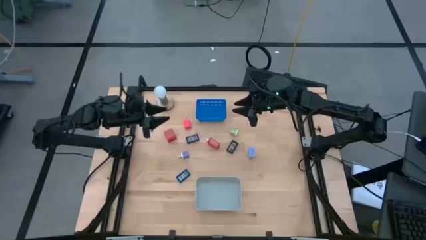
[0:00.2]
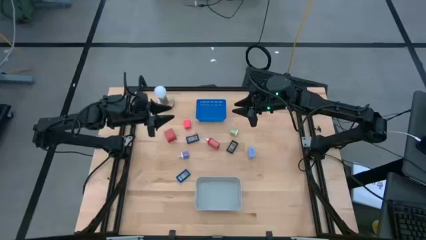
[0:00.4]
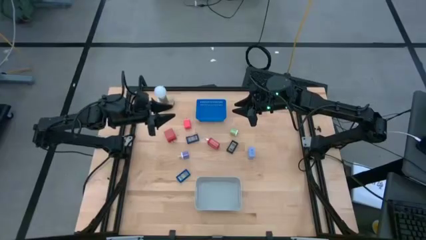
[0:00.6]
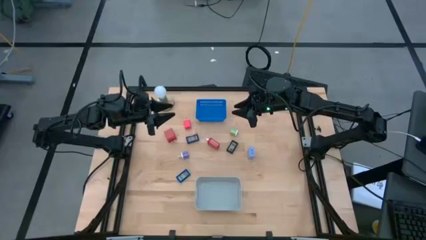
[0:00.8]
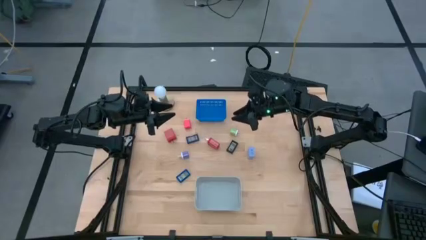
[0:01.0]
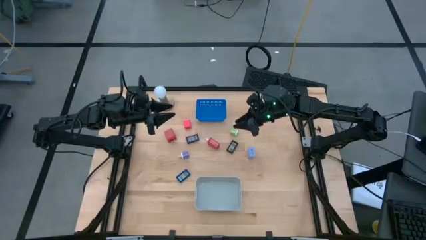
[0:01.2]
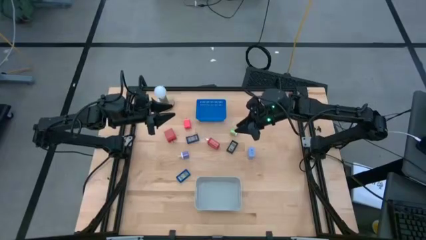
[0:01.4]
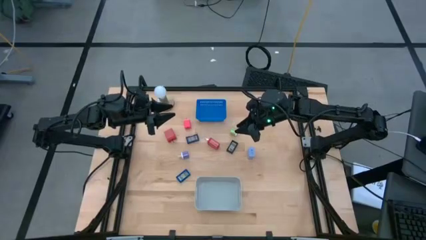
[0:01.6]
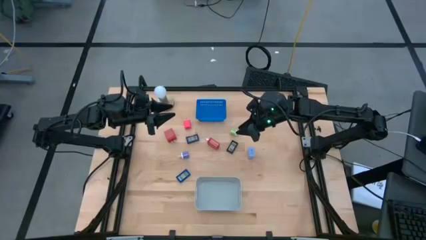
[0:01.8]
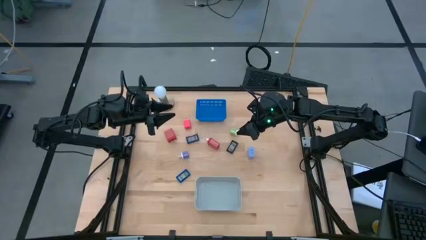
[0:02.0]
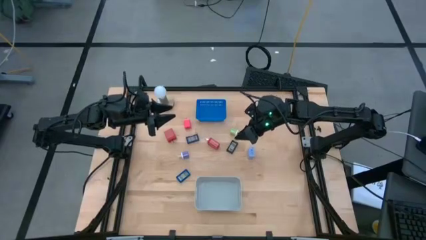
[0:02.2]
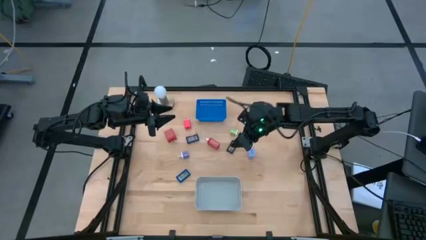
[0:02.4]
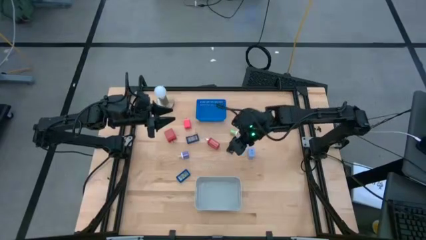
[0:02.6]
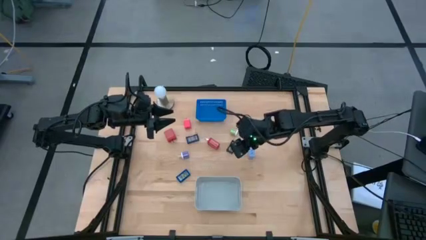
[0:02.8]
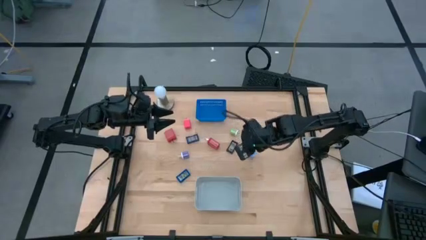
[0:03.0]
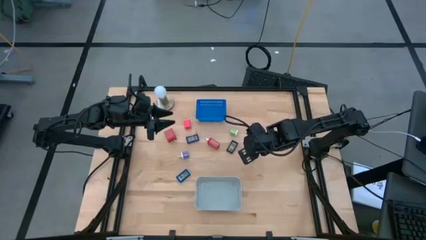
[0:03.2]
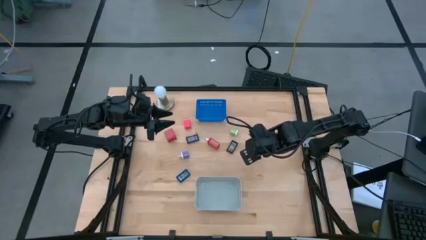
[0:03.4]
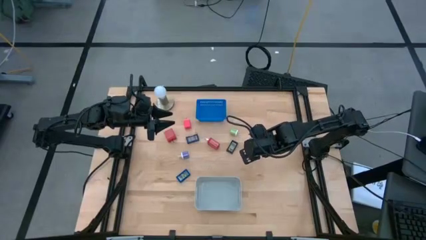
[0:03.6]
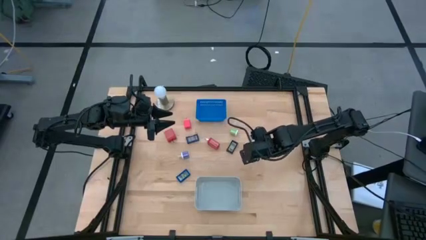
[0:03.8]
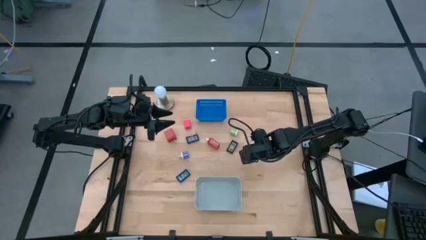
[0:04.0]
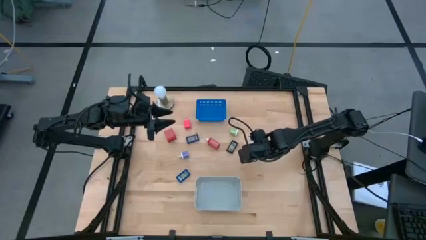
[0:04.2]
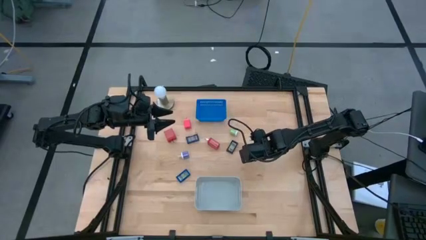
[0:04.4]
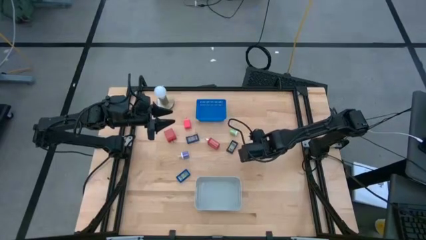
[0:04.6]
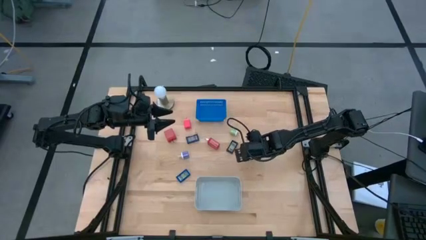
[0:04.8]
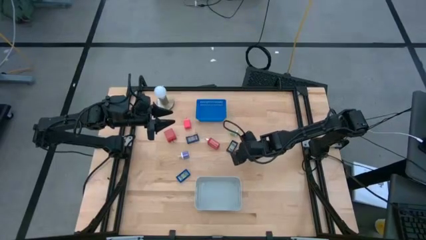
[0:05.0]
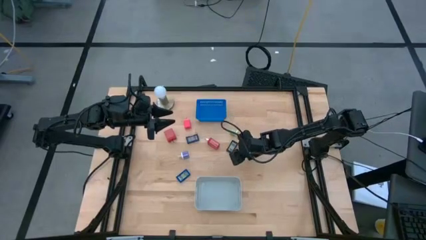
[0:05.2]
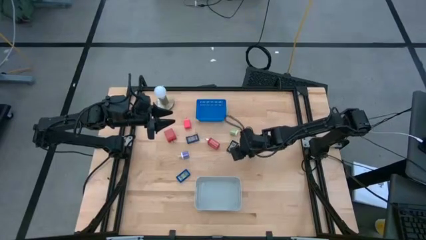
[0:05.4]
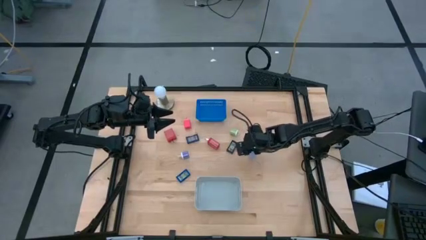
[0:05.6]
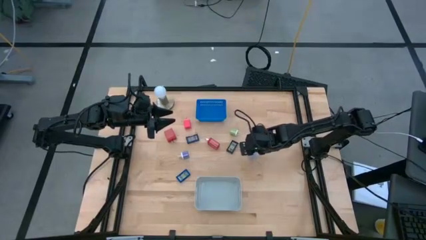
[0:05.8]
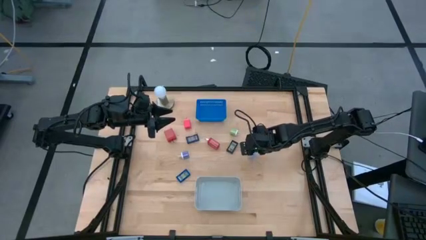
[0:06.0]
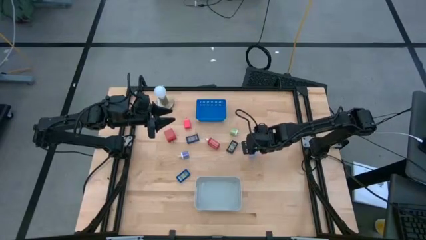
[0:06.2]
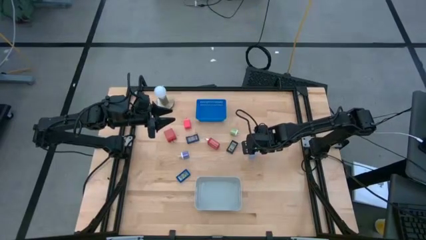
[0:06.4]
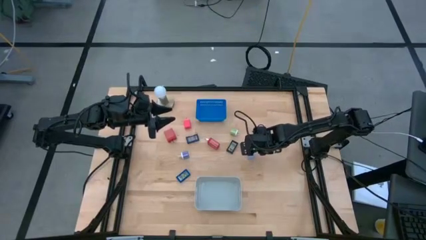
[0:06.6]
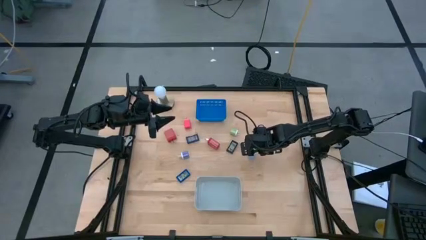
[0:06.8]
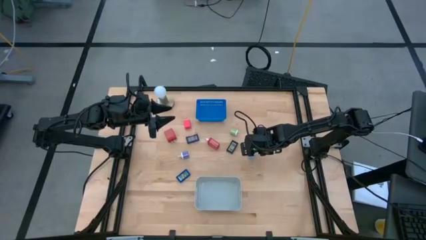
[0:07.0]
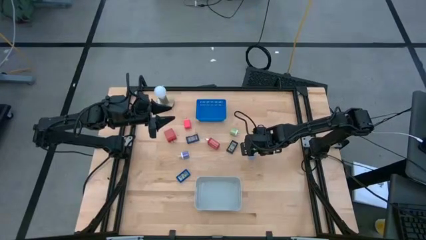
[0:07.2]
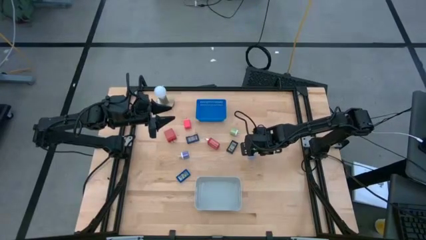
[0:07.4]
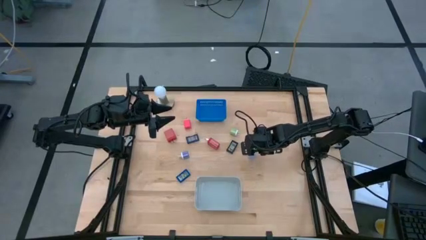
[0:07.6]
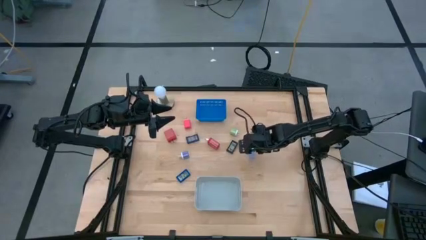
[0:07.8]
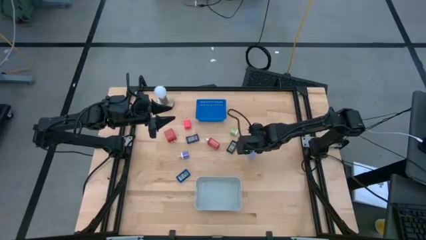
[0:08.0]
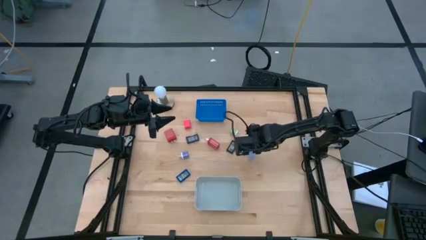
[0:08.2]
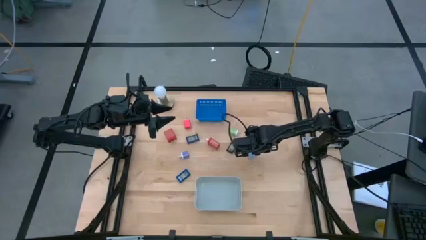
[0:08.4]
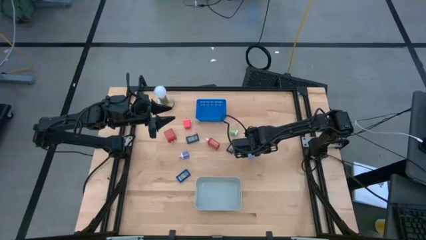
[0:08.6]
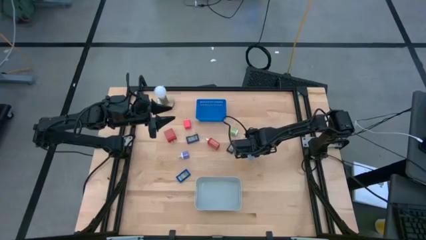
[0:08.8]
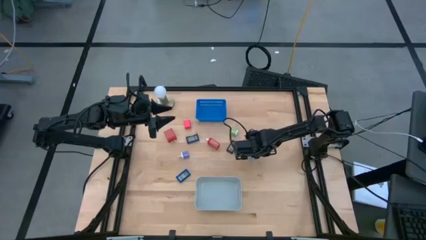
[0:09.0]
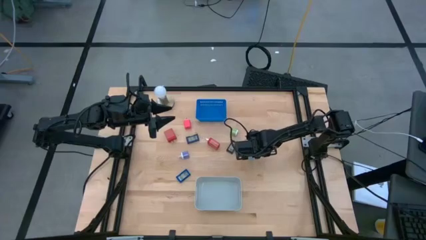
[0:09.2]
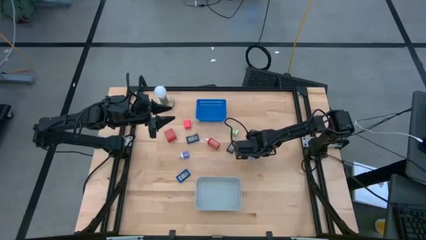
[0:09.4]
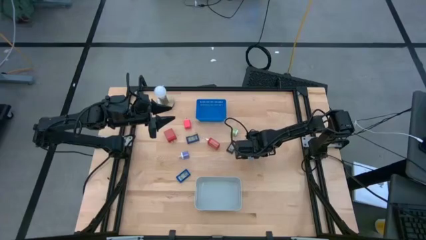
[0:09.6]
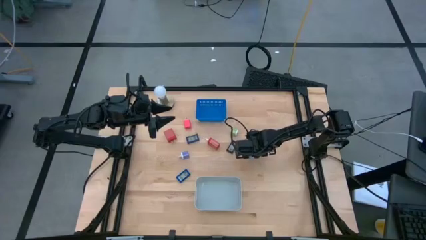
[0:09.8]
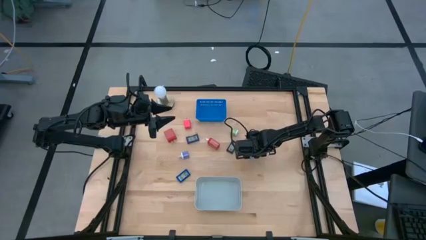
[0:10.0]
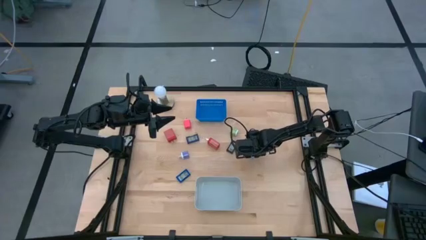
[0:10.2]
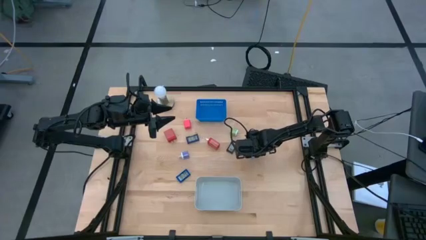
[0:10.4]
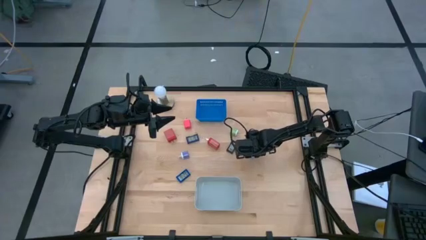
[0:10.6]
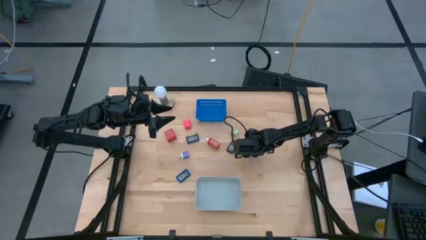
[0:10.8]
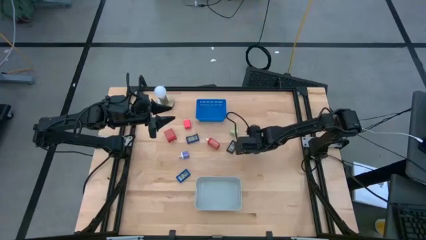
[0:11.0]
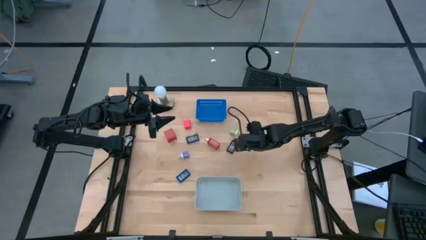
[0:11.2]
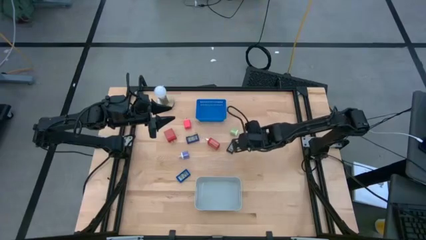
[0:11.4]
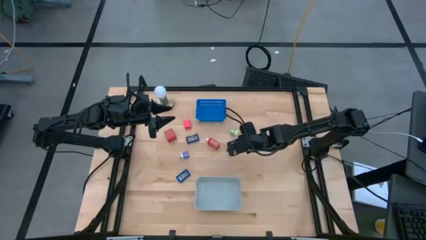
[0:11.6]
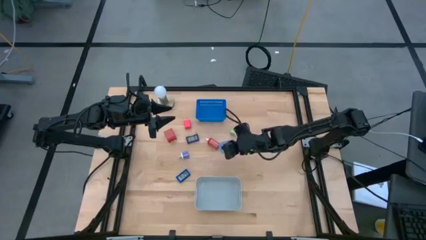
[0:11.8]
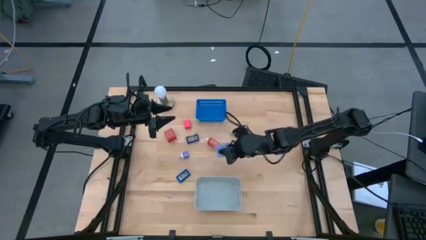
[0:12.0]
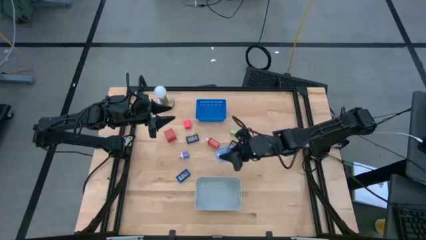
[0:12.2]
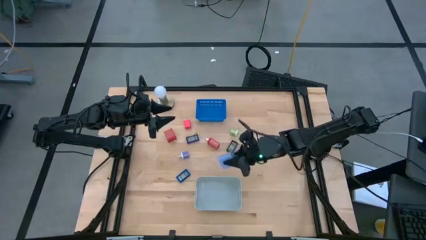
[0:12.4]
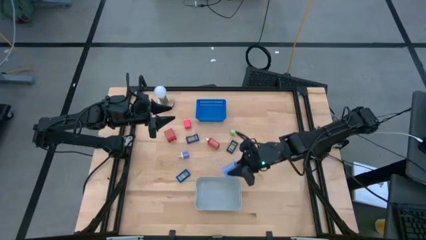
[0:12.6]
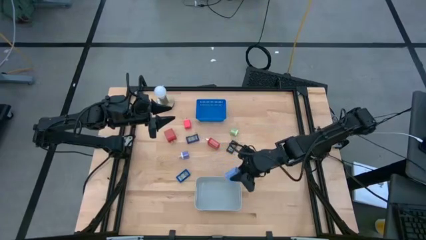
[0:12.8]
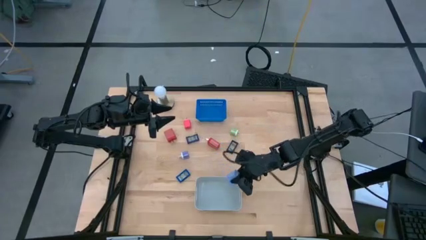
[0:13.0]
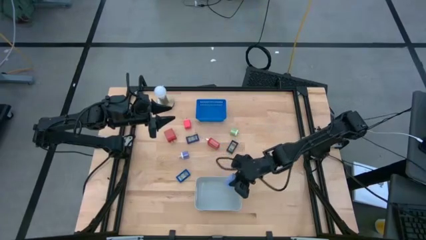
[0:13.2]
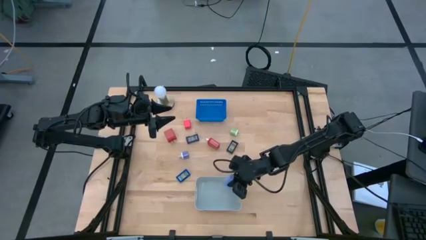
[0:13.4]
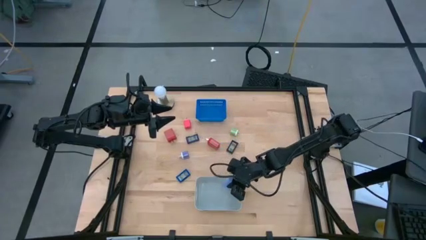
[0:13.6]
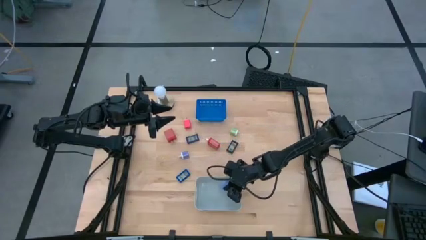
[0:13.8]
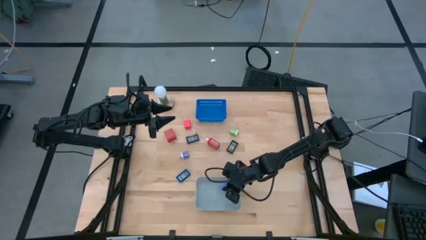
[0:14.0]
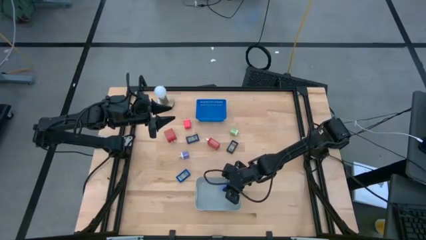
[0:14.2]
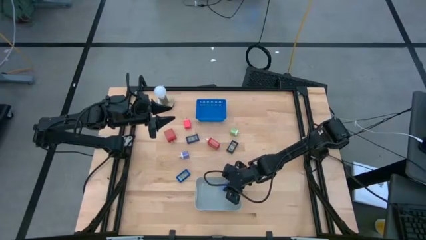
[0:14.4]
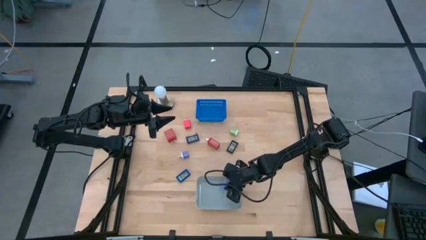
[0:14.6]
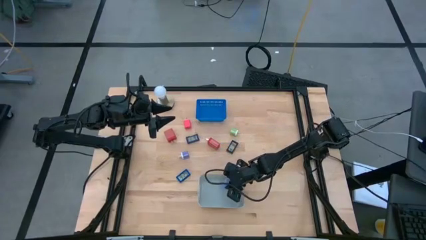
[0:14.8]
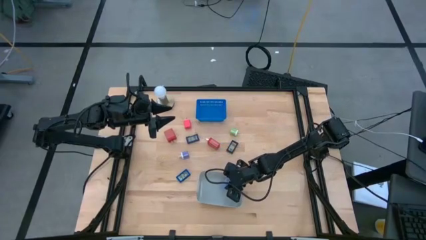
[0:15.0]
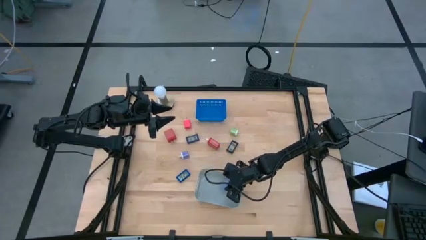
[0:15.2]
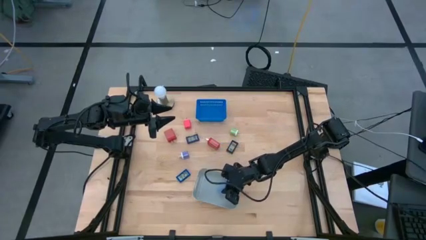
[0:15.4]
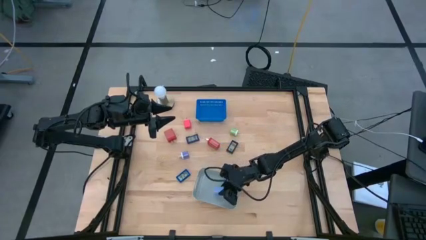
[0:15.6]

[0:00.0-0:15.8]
Task: Pick & Place Office items
Put the blue charger adapter into the gray bin
